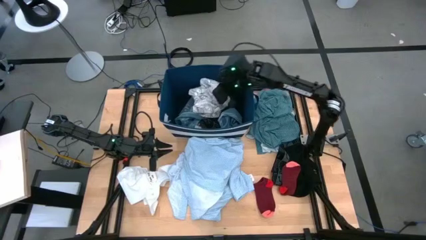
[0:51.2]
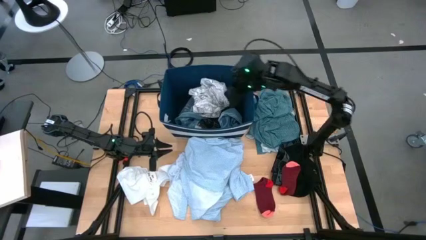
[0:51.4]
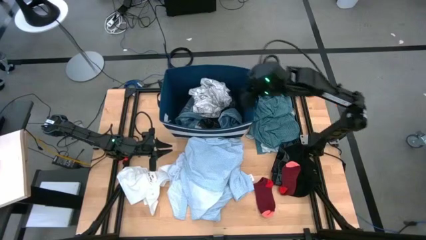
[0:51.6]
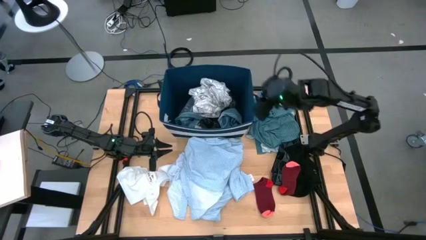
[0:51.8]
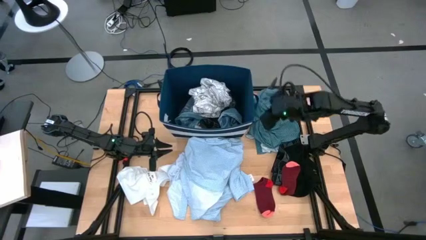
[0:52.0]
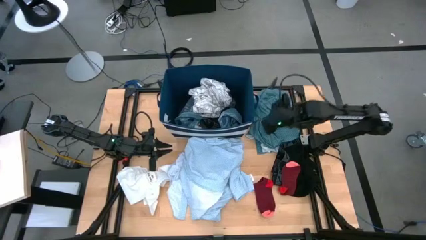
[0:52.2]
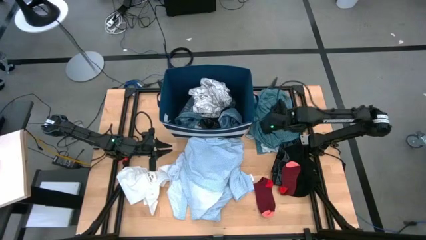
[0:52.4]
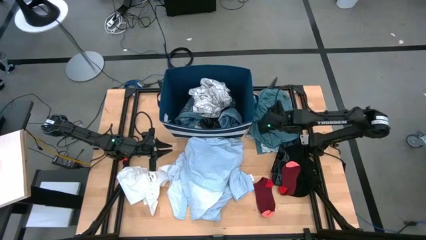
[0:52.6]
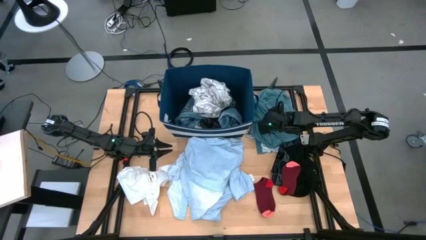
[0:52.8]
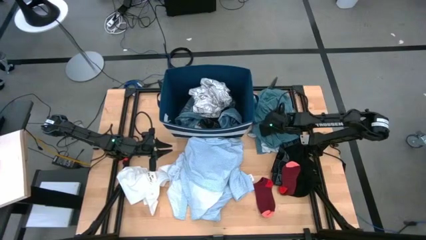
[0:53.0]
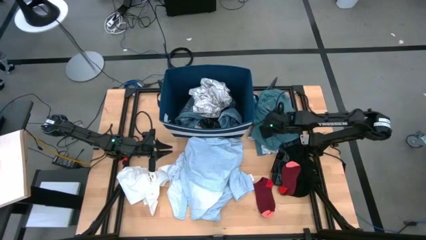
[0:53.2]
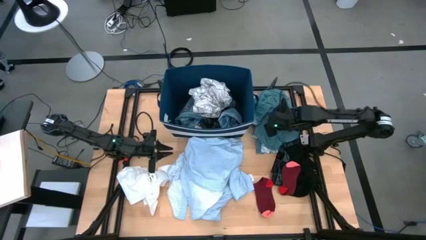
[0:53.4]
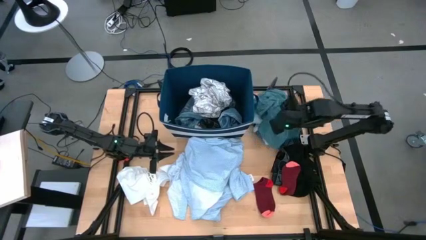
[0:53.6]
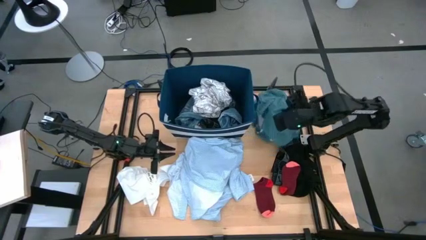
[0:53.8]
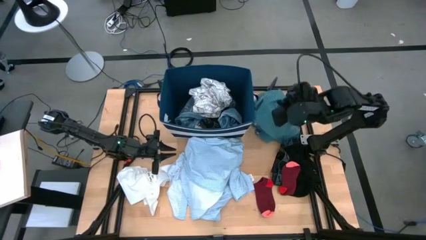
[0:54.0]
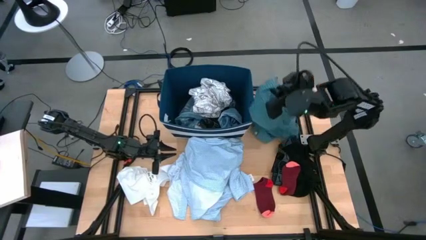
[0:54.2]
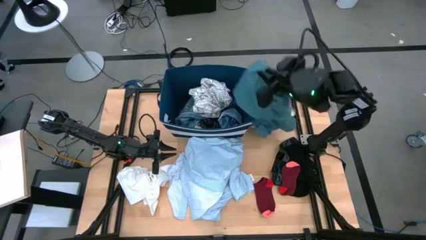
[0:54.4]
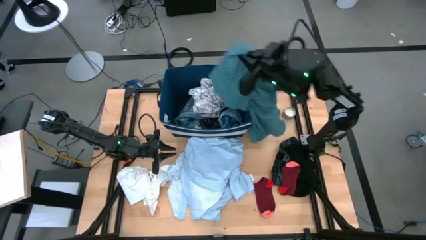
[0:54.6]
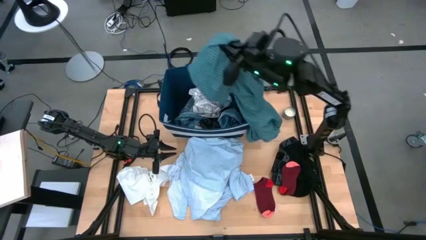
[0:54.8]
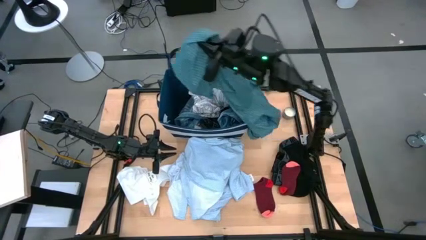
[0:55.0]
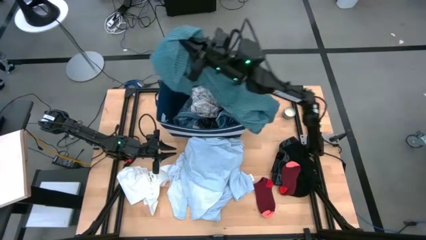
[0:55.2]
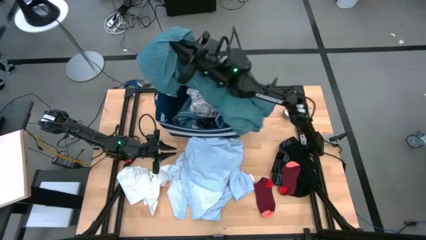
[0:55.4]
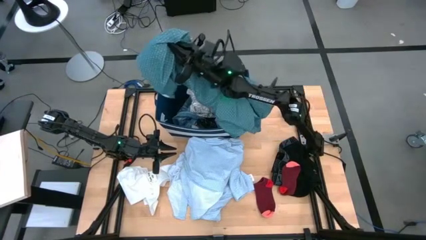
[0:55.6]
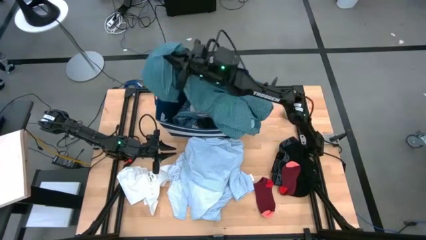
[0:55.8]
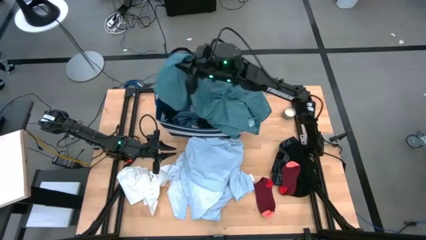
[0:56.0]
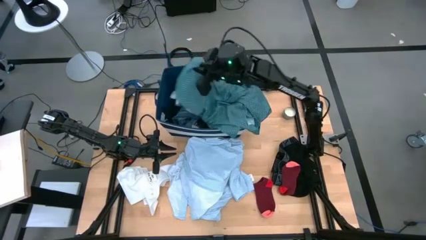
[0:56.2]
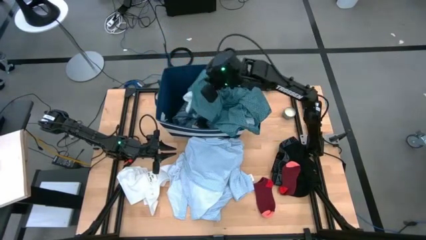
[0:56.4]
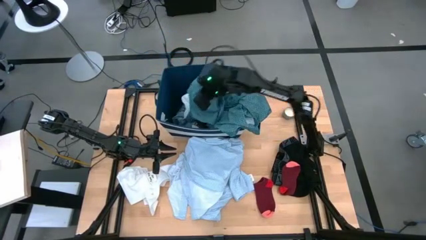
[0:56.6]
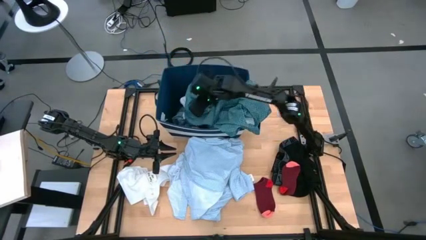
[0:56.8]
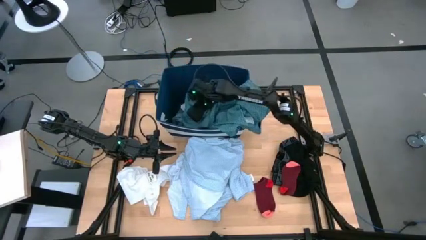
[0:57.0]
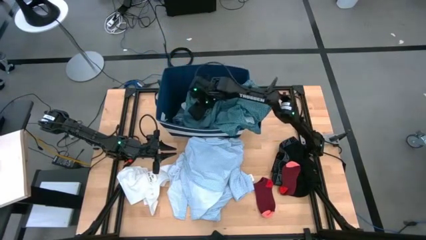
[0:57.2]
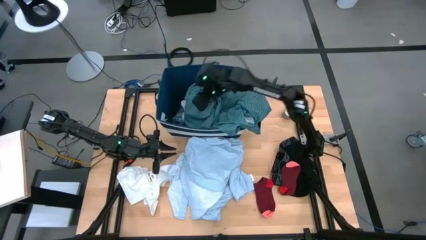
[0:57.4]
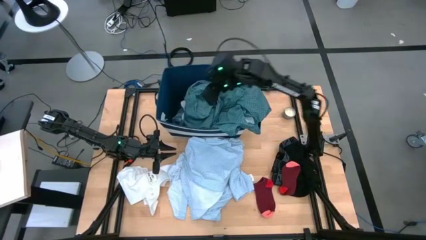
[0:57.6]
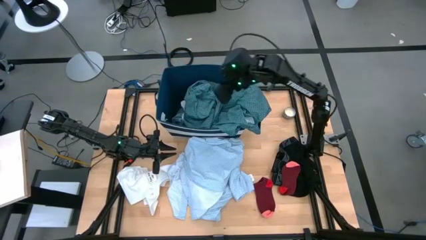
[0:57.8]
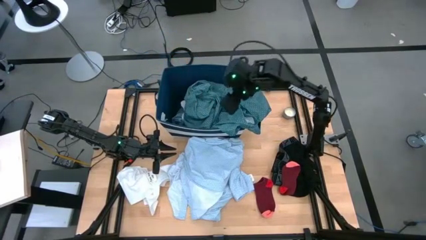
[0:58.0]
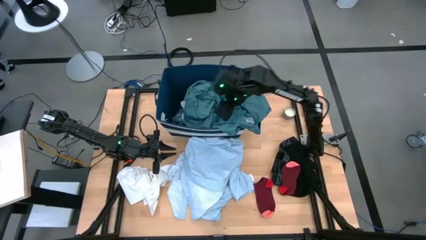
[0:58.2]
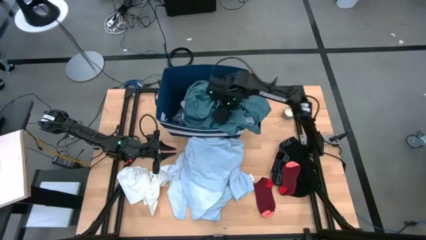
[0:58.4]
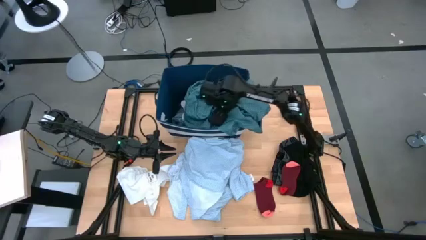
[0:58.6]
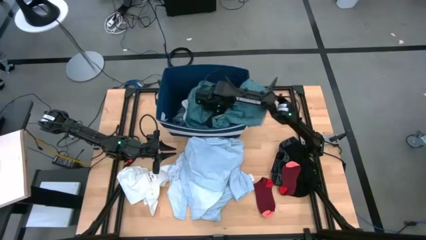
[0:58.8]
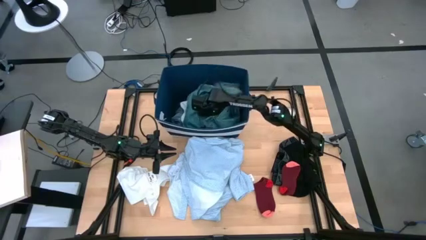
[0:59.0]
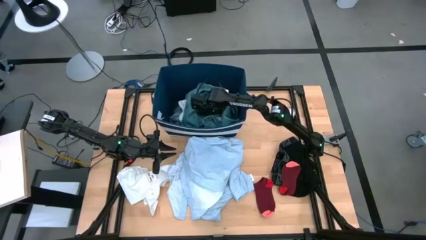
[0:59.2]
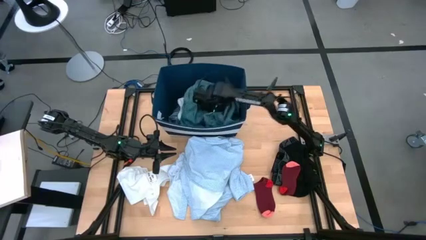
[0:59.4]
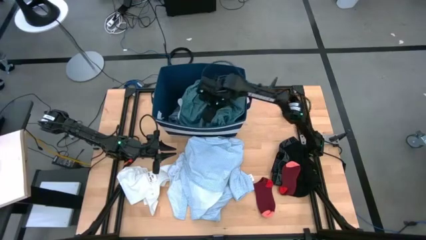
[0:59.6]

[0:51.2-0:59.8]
Task: Sort clothes
Put the green patient gown into the bin

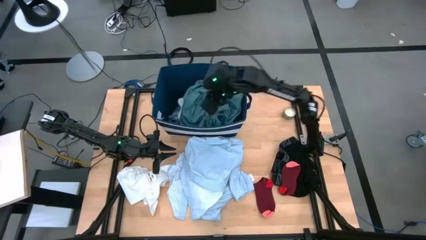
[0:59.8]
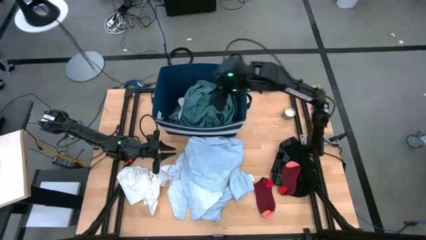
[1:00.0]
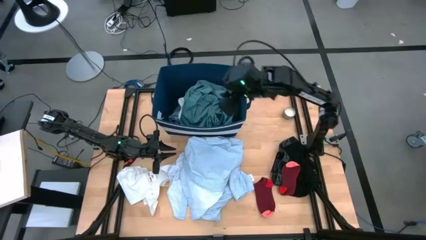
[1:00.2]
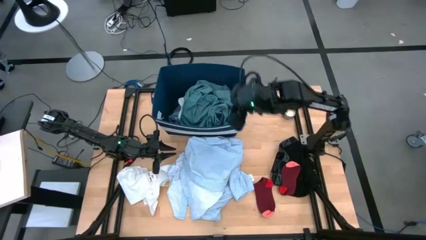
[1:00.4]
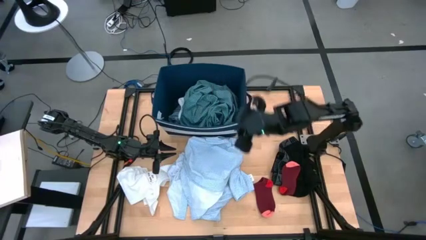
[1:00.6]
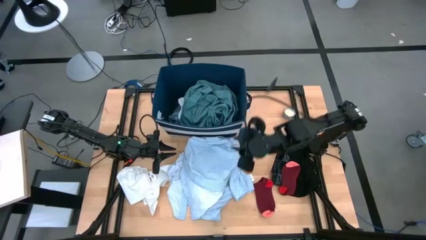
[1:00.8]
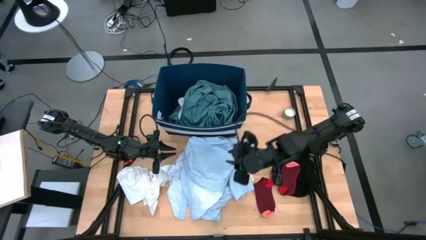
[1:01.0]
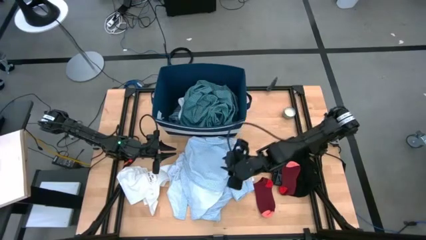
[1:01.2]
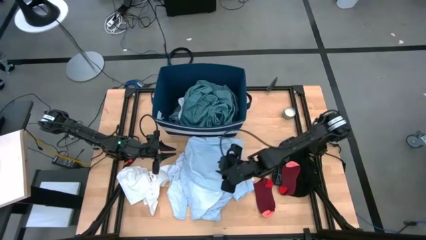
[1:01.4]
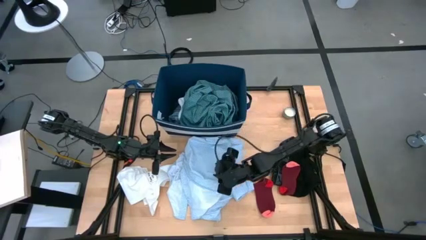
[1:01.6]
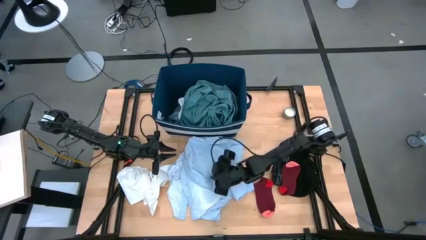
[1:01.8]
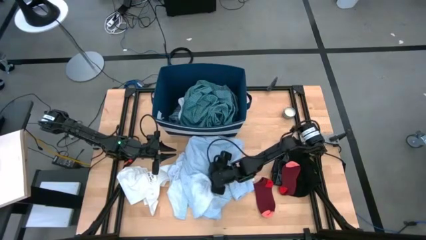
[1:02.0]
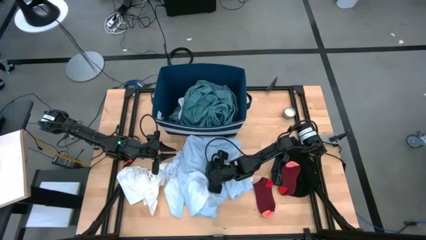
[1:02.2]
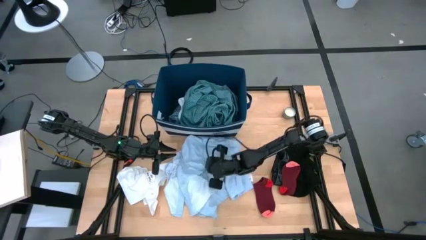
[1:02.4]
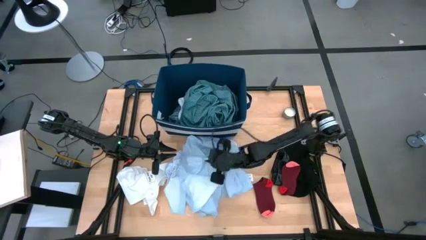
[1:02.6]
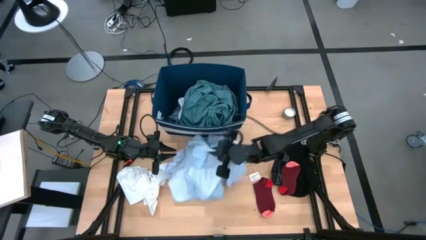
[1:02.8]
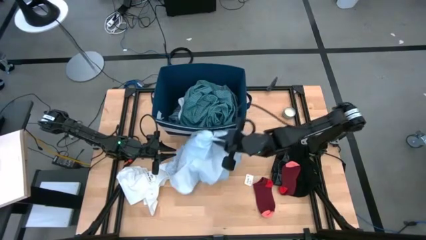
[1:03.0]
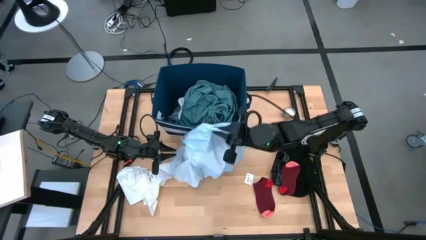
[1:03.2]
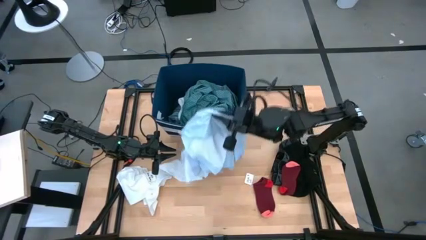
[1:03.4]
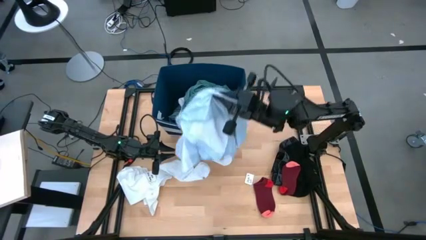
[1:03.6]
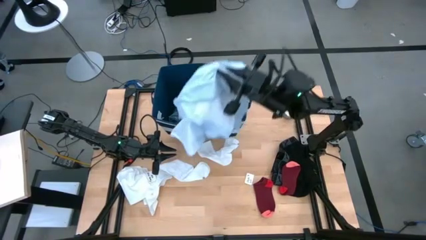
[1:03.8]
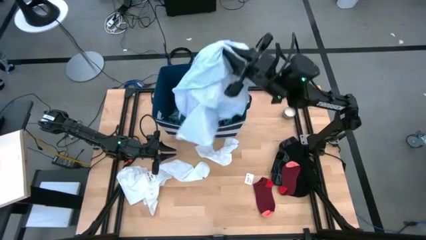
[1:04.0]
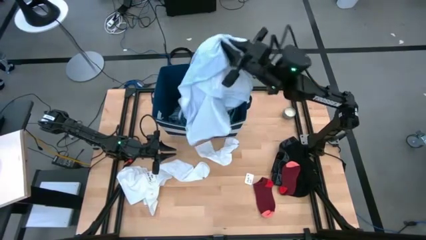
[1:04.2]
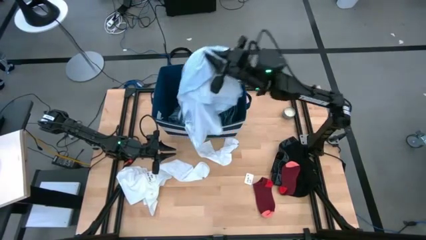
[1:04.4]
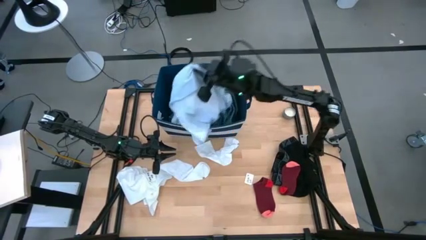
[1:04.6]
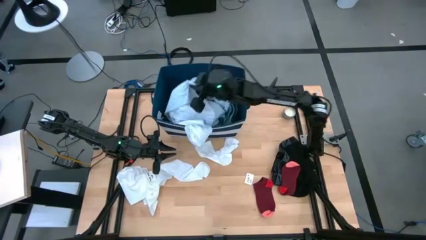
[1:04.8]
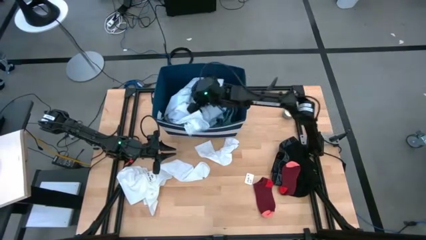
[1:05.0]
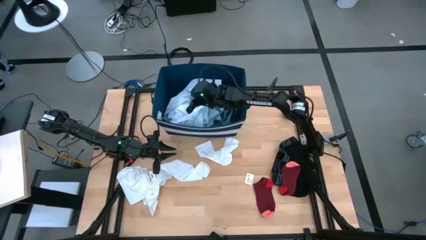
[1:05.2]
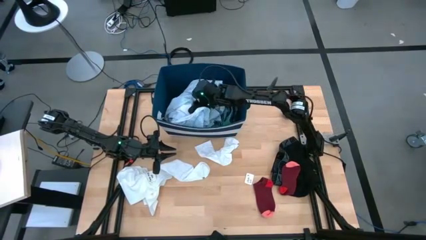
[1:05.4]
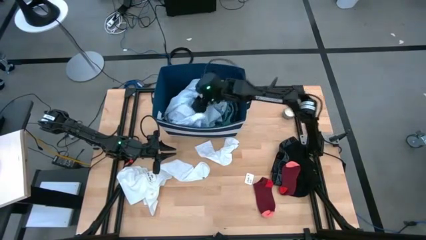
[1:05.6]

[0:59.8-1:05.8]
Put the light blue shirt into the bin

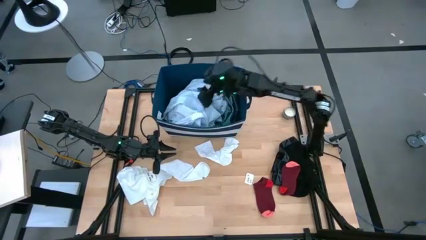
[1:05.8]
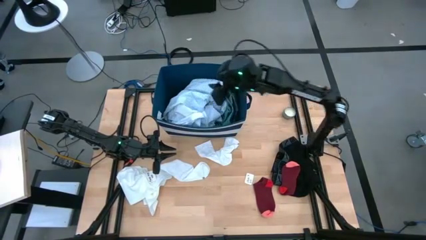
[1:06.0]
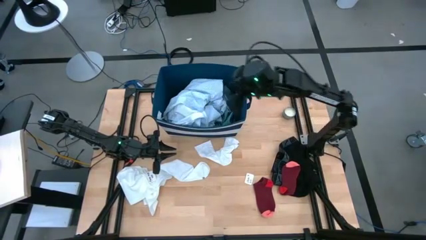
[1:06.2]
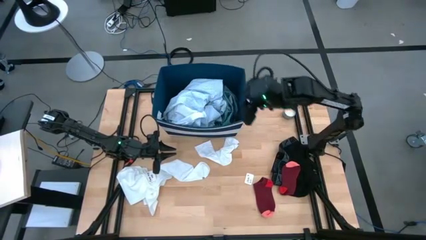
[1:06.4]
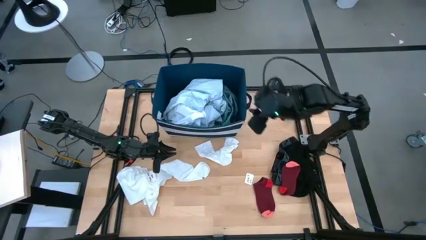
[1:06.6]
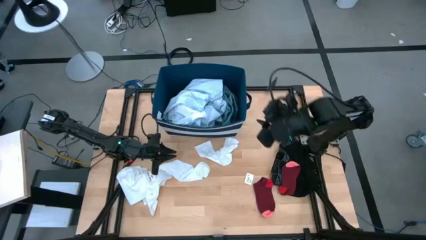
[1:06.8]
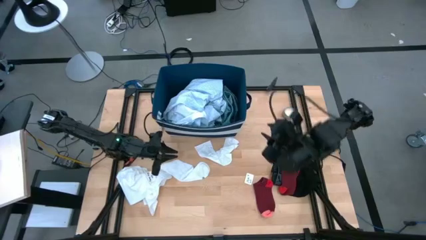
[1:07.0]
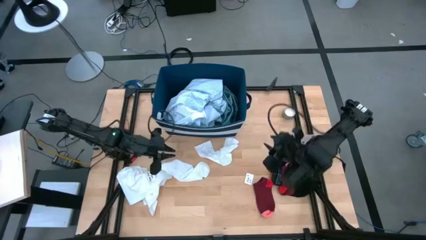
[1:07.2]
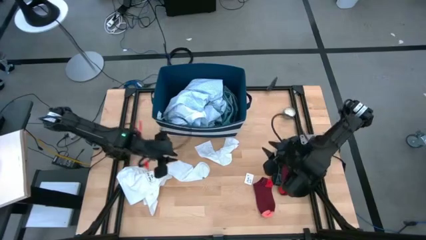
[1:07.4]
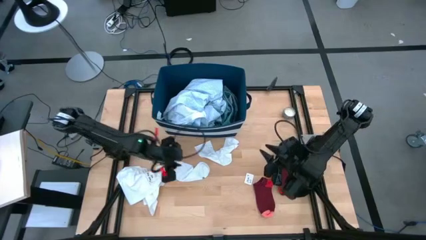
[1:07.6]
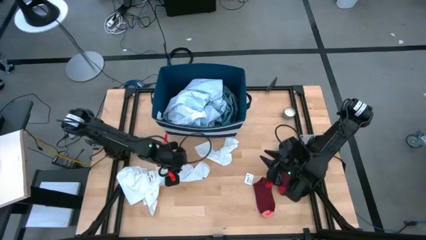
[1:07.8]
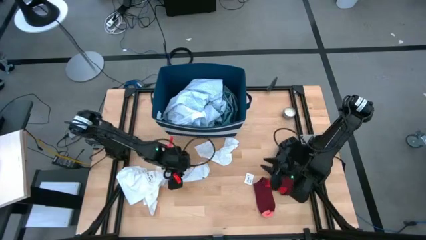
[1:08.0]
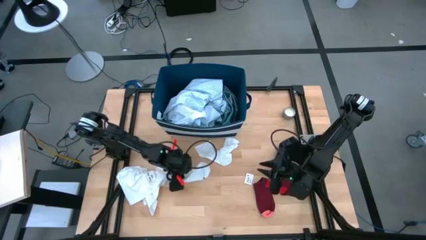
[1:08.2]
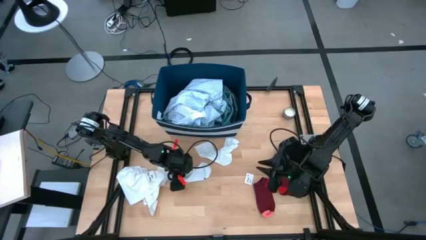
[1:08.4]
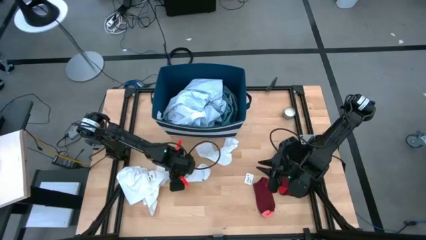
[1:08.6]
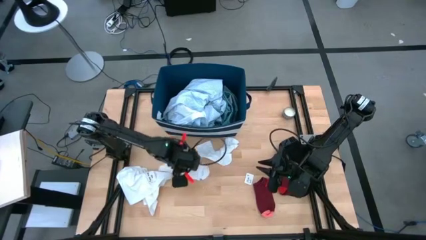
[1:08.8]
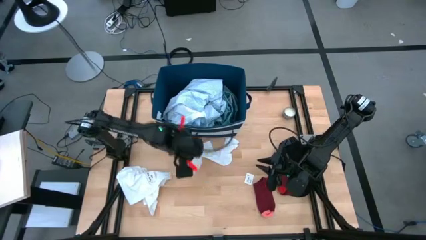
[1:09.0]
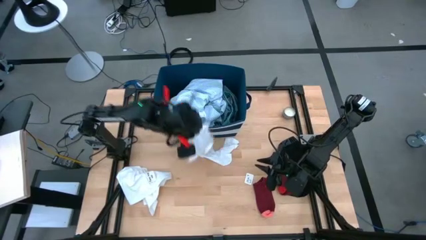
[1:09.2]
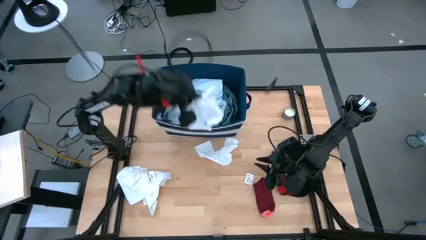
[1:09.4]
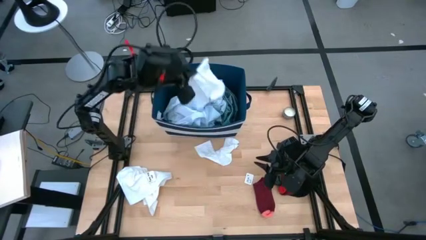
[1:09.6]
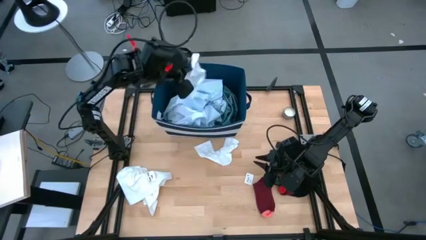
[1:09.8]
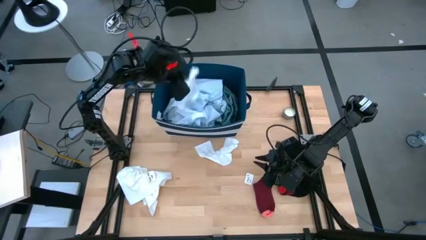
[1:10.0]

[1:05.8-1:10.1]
Put the bottom white sock into the bin
